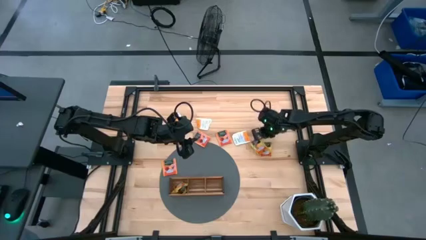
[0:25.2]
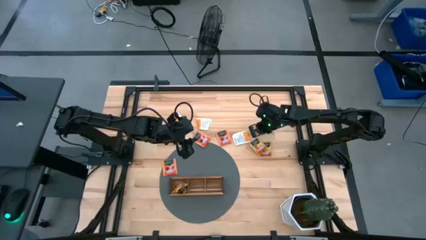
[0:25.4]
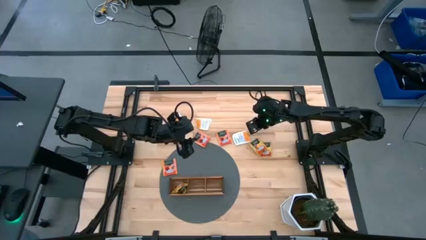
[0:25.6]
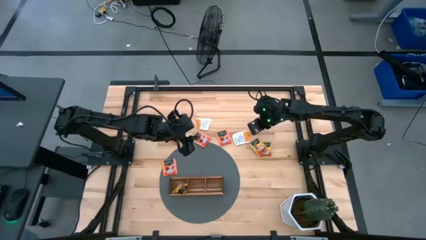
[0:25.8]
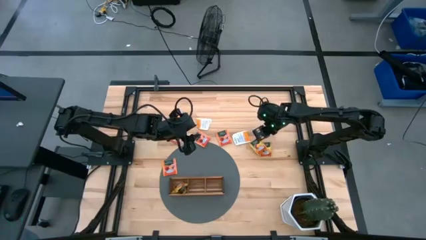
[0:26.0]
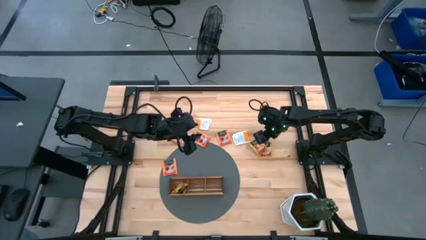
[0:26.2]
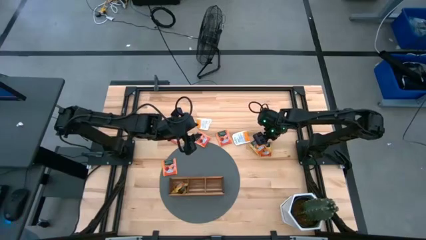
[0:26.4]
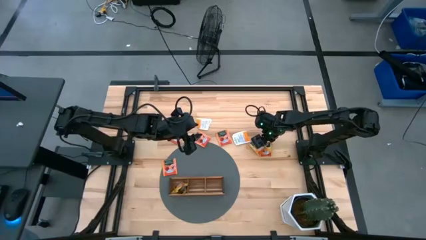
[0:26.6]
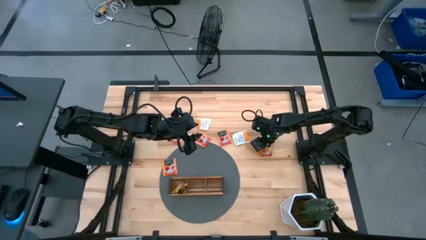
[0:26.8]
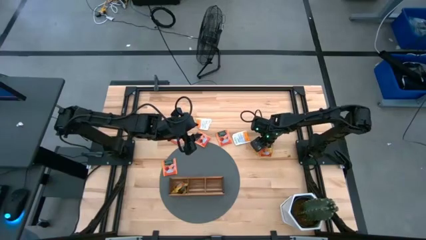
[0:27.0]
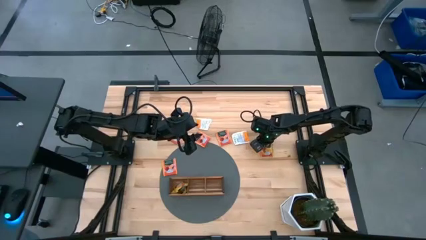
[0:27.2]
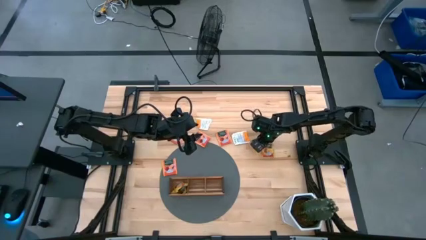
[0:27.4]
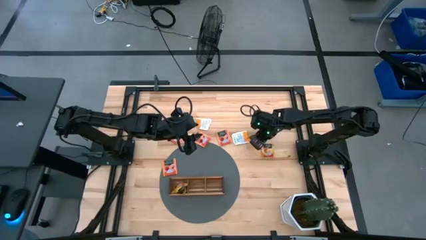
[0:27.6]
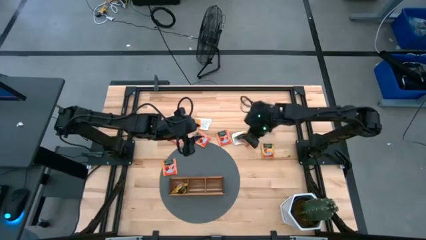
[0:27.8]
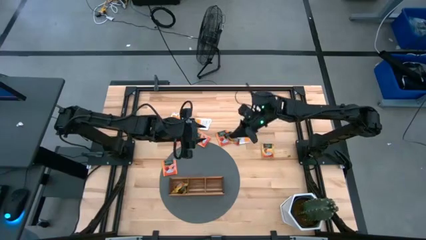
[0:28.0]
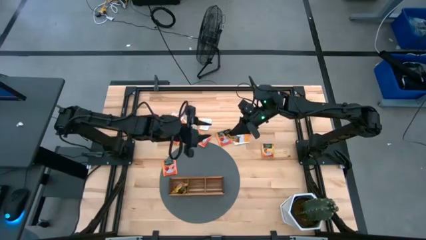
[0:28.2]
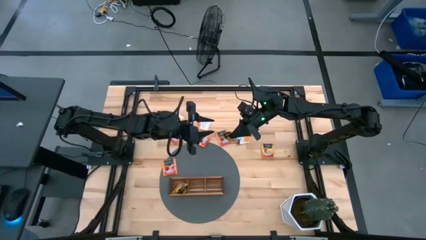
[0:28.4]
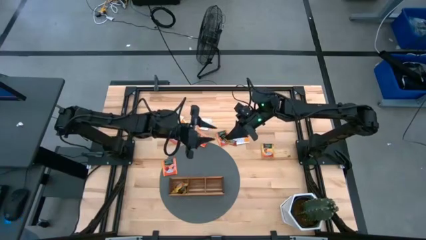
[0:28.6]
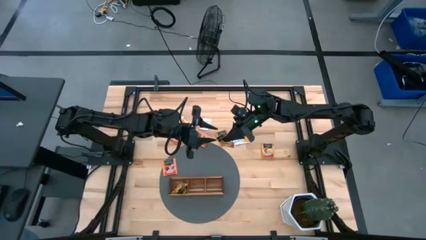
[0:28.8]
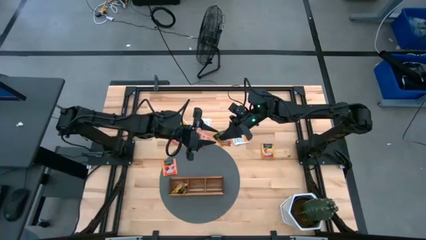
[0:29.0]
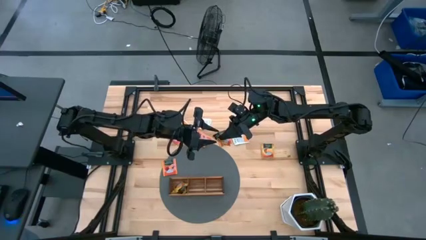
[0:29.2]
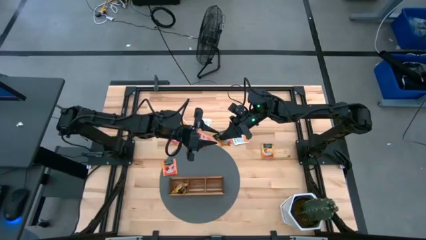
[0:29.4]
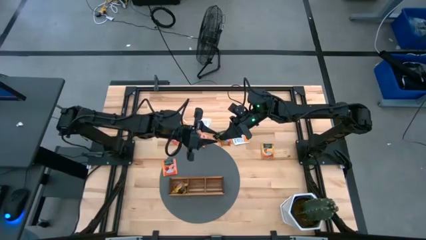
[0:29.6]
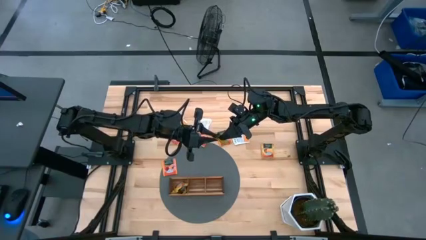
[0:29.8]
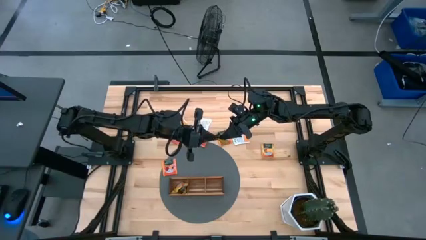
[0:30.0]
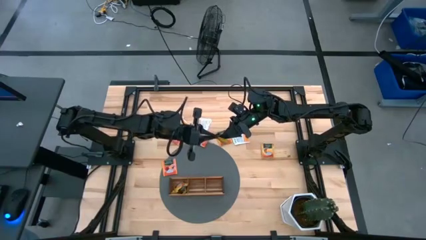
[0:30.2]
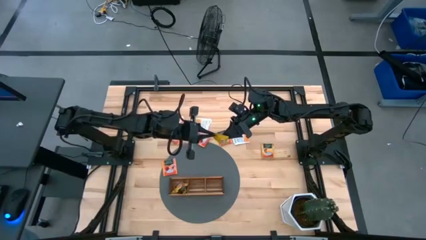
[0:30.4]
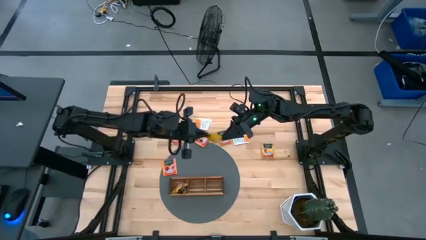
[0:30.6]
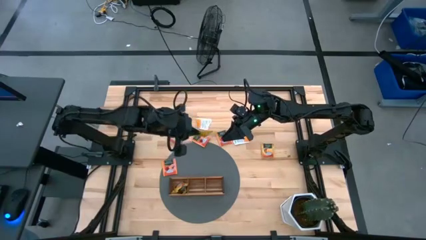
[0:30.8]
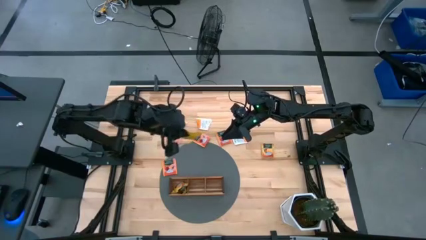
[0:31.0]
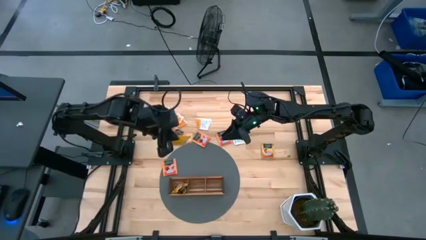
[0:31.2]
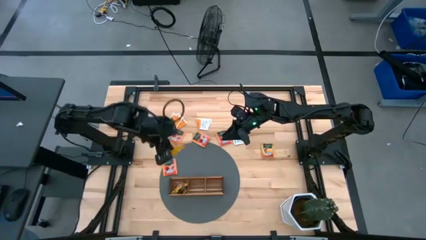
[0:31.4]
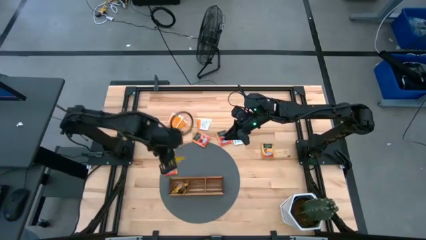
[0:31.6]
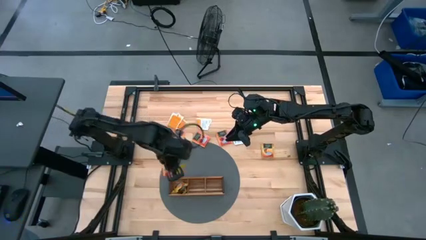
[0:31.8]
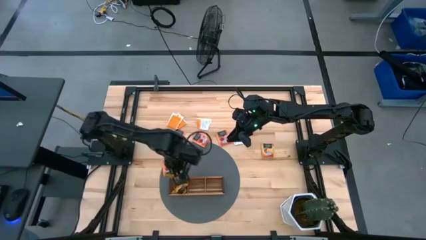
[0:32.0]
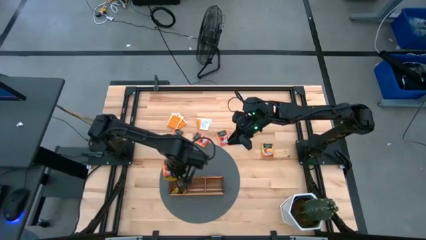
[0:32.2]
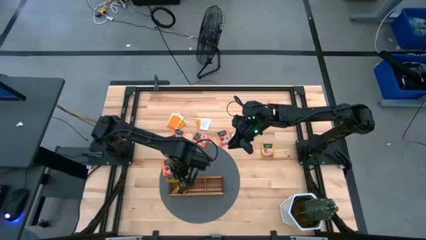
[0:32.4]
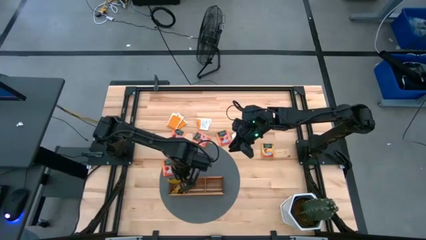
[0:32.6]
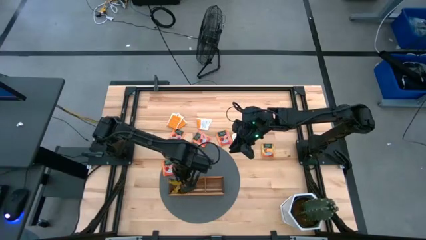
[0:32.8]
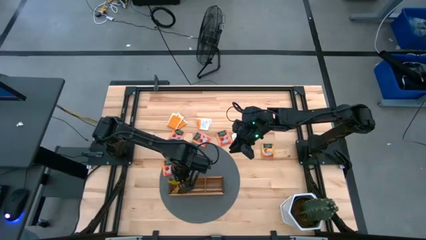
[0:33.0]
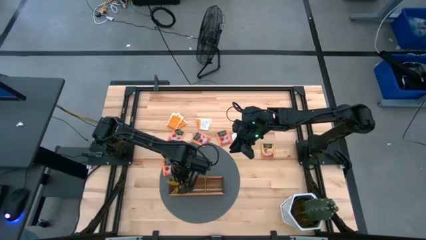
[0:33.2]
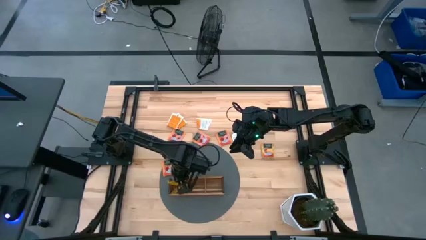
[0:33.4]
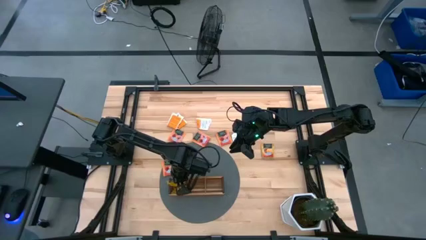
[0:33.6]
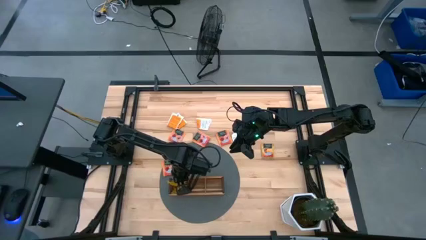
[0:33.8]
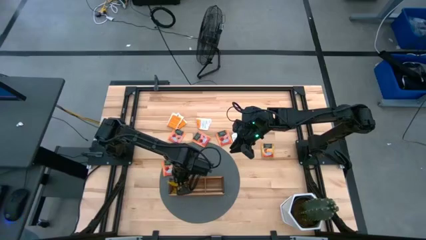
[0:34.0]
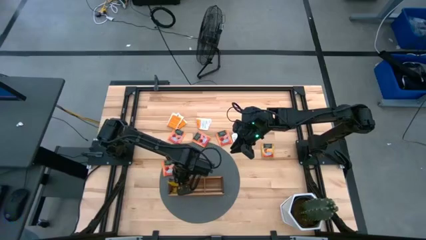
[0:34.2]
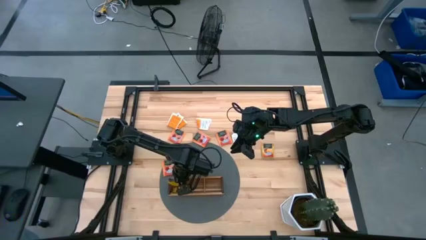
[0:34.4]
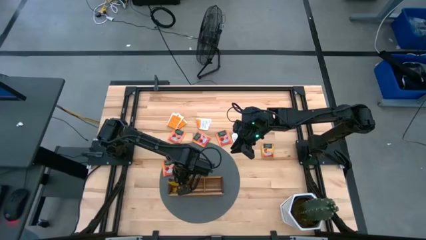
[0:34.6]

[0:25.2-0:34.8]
Task: Pick & Place Tea
Put the yellow tea bag into the left section of the wooden organizer
